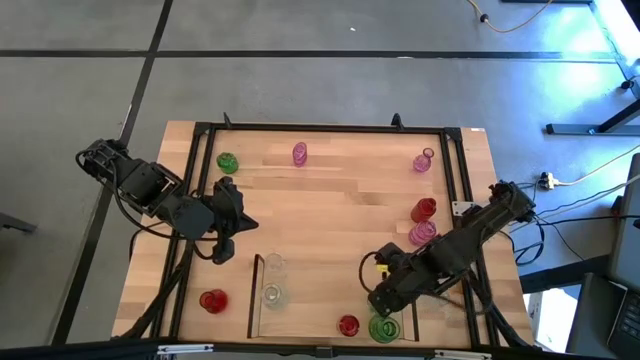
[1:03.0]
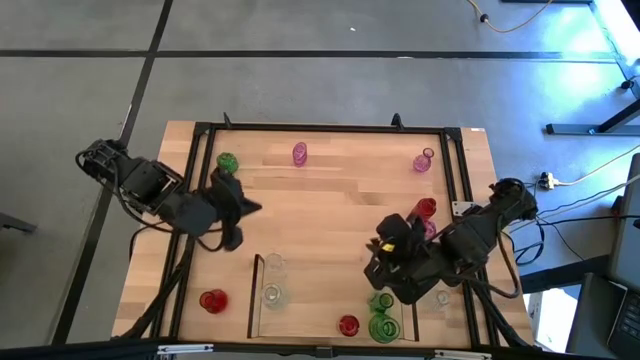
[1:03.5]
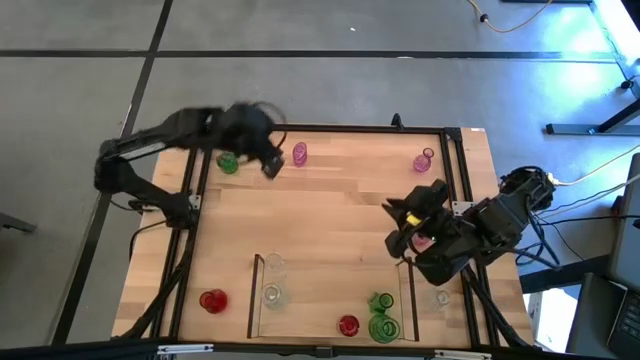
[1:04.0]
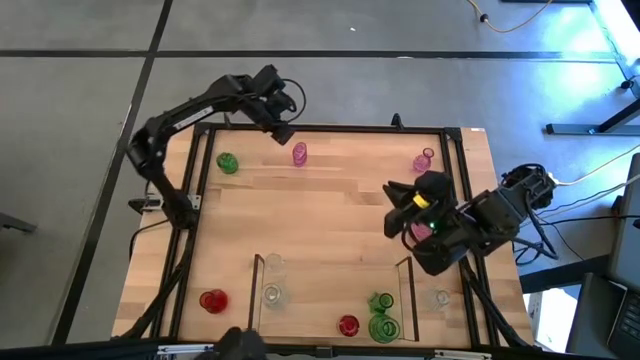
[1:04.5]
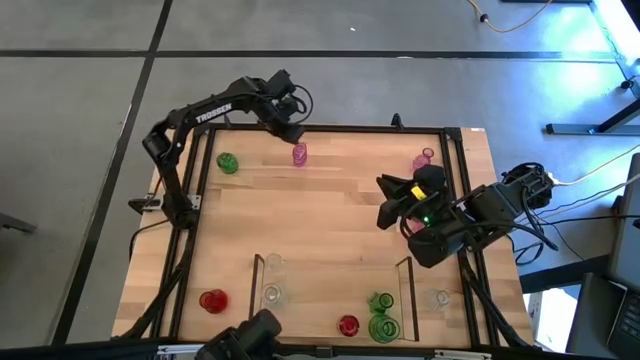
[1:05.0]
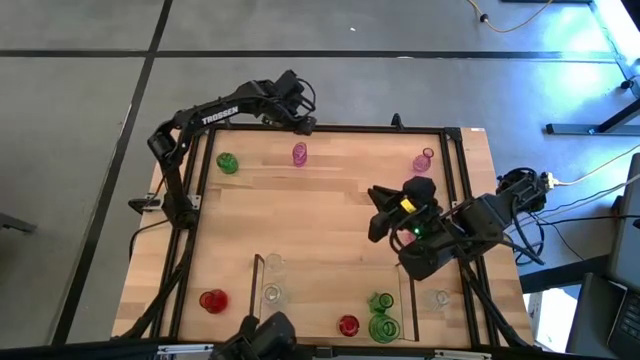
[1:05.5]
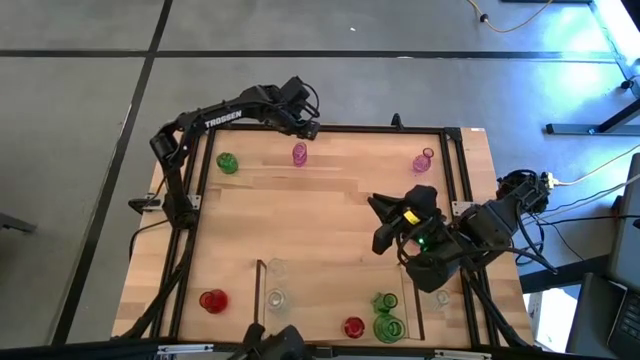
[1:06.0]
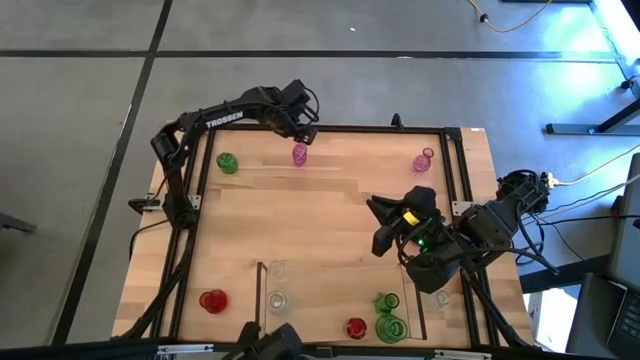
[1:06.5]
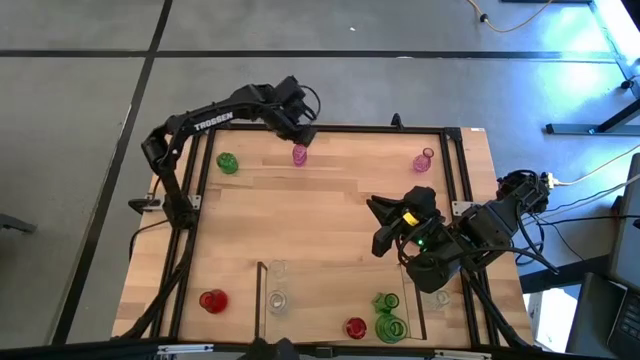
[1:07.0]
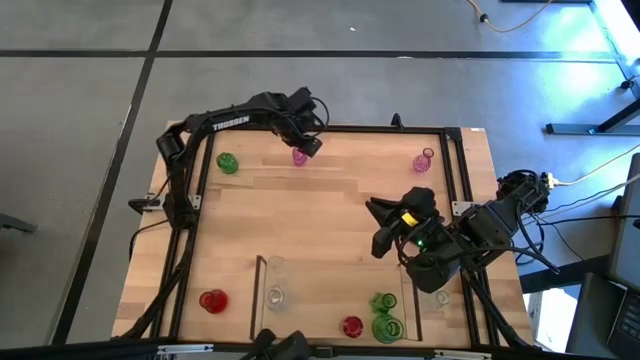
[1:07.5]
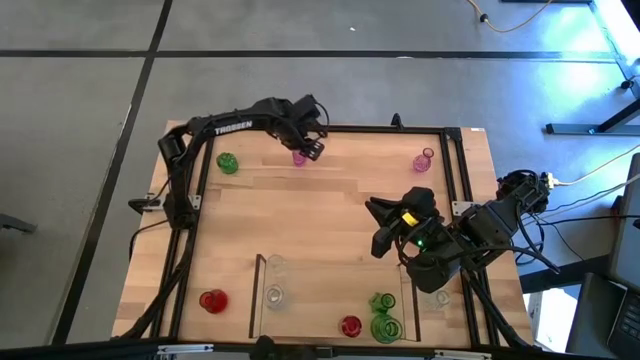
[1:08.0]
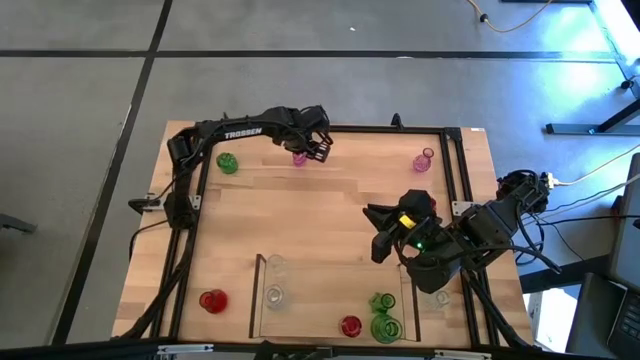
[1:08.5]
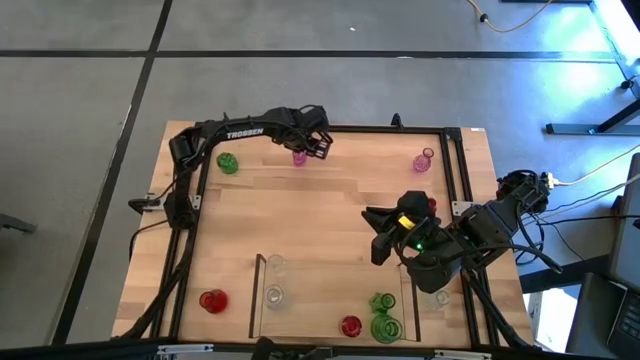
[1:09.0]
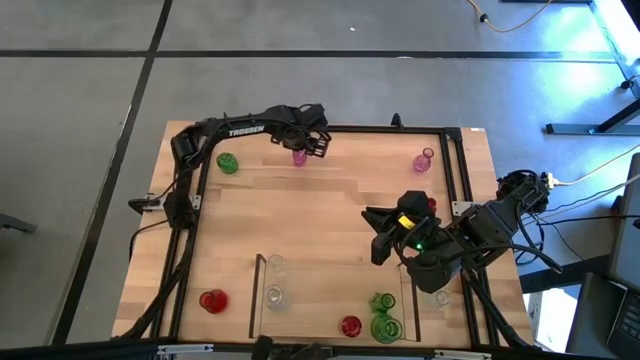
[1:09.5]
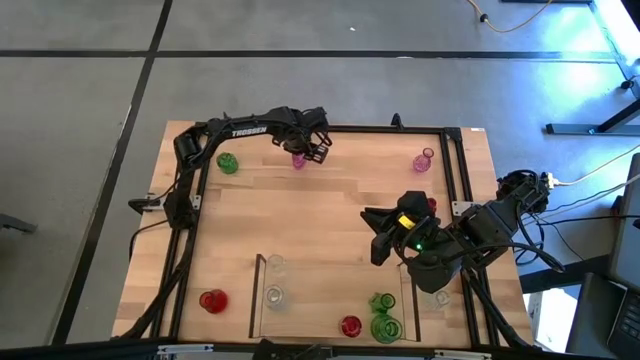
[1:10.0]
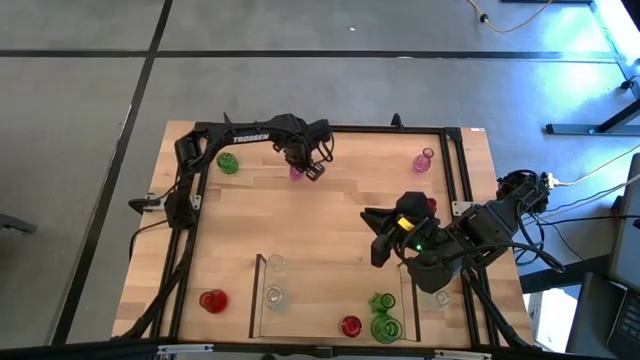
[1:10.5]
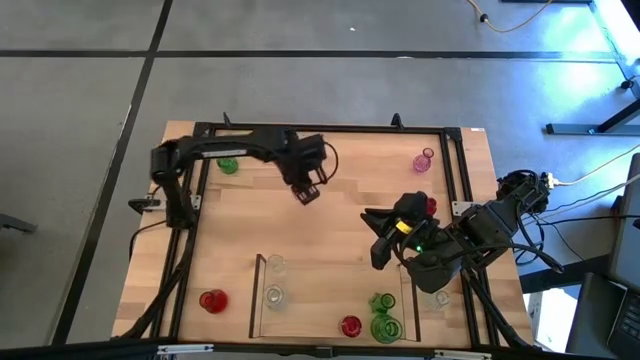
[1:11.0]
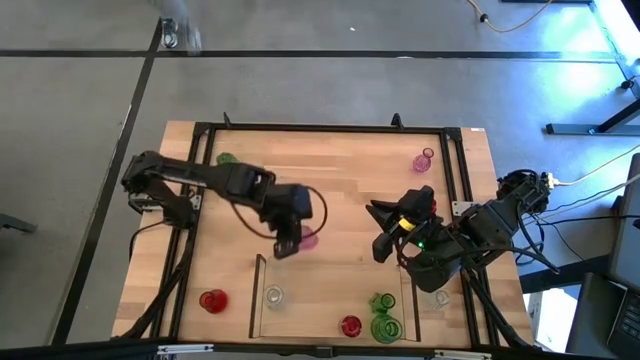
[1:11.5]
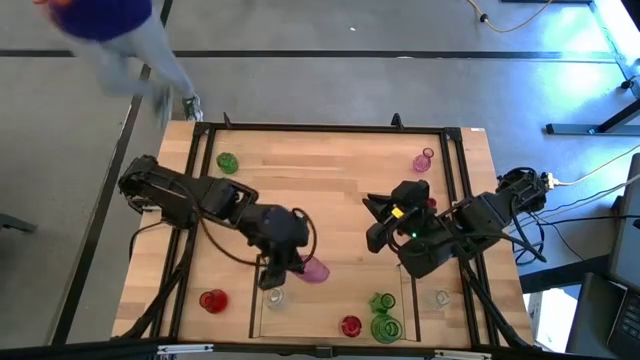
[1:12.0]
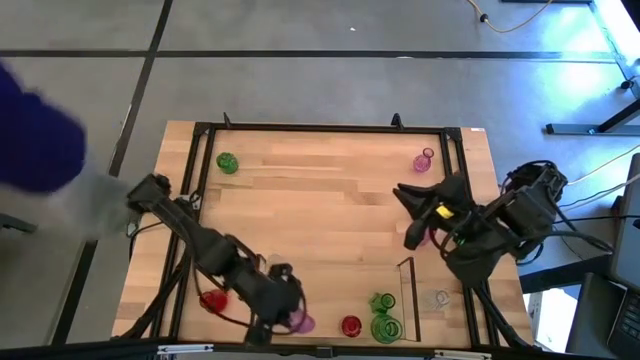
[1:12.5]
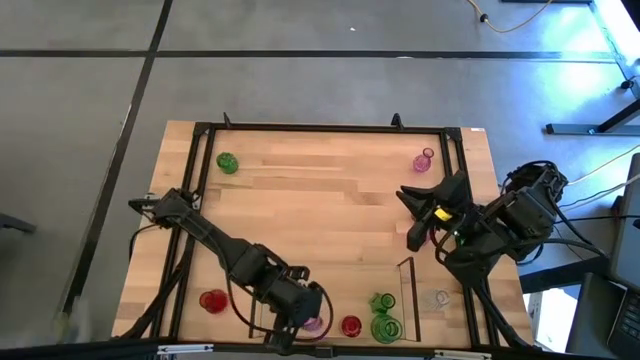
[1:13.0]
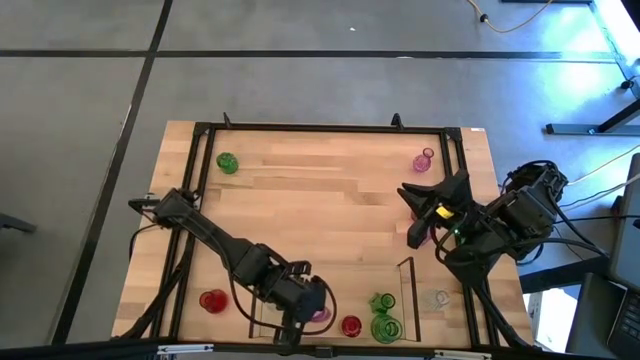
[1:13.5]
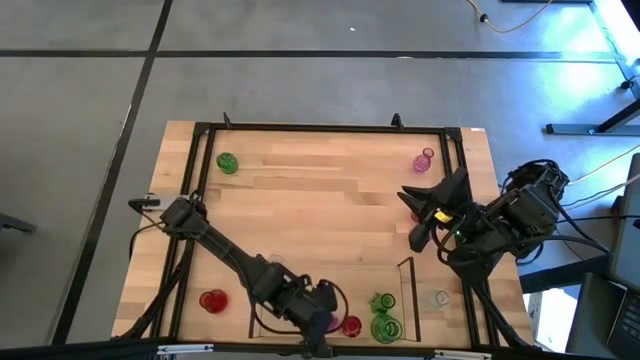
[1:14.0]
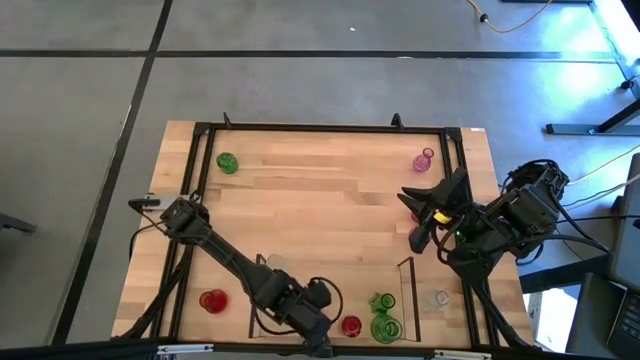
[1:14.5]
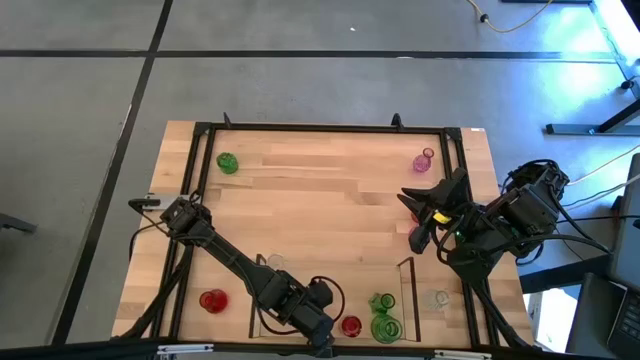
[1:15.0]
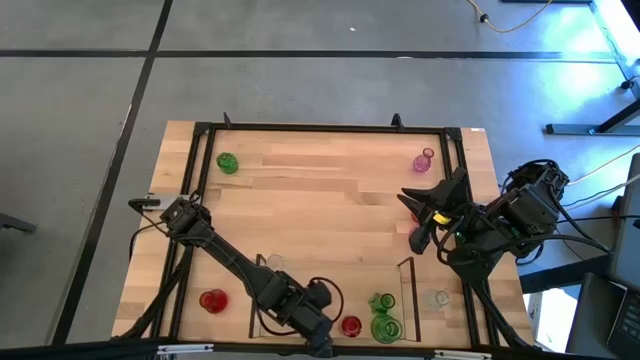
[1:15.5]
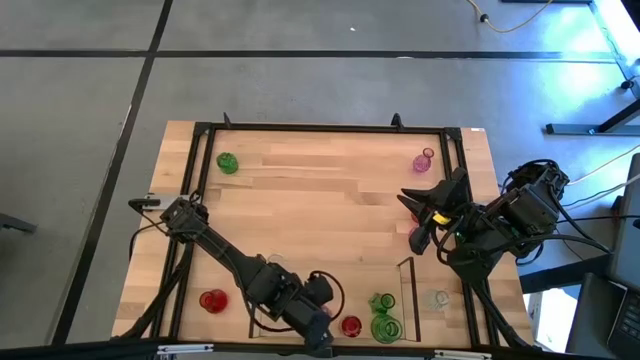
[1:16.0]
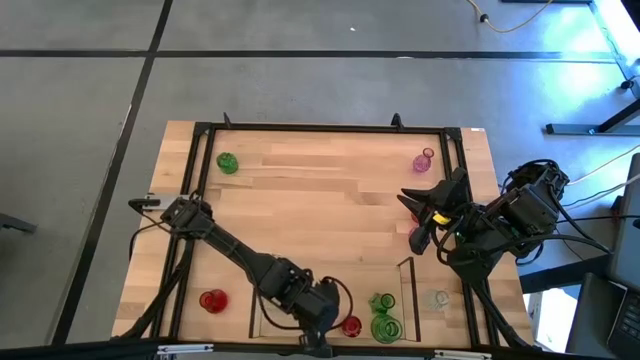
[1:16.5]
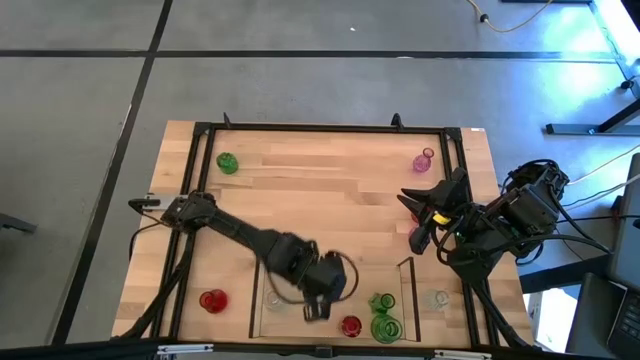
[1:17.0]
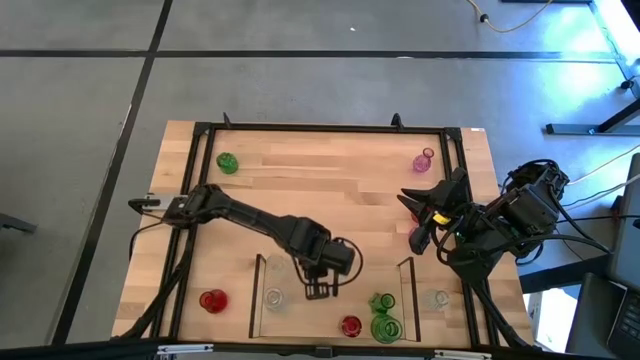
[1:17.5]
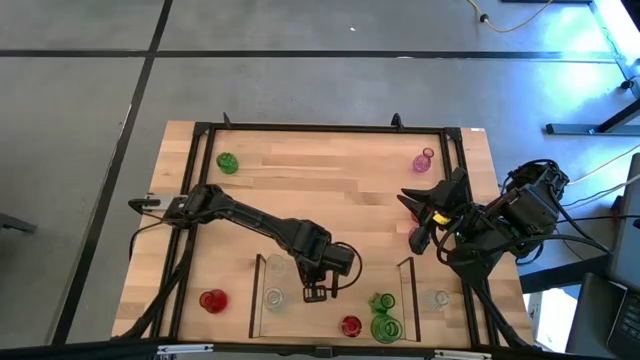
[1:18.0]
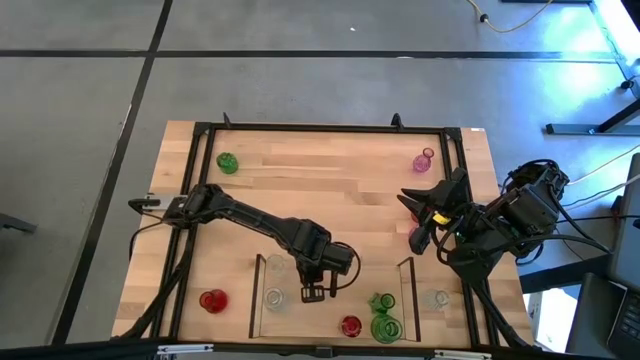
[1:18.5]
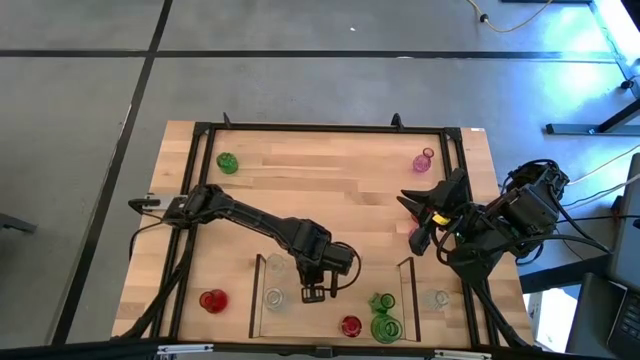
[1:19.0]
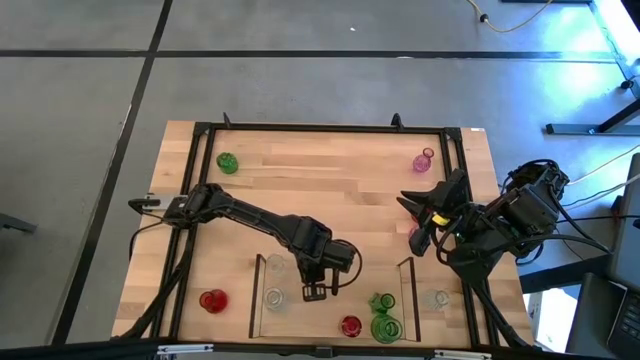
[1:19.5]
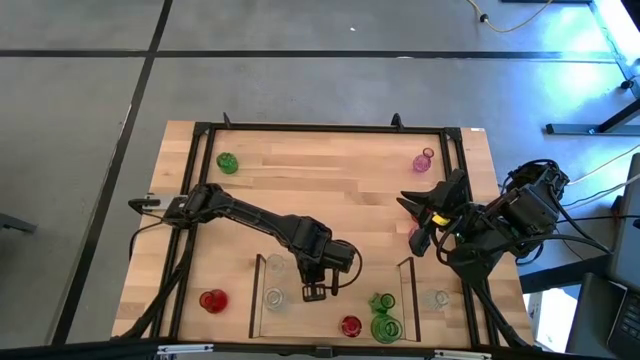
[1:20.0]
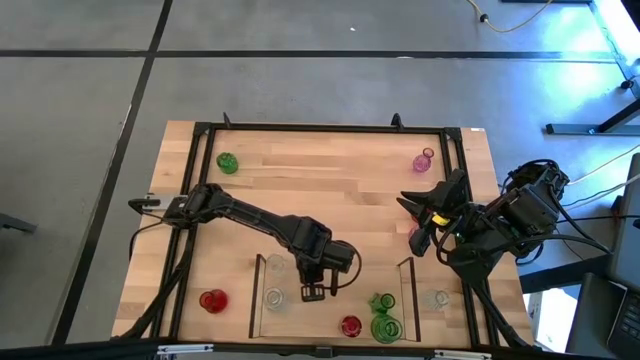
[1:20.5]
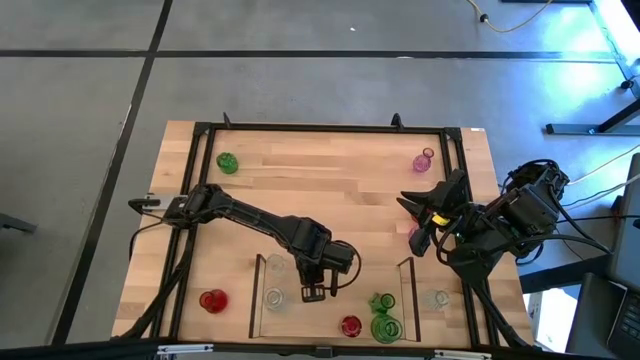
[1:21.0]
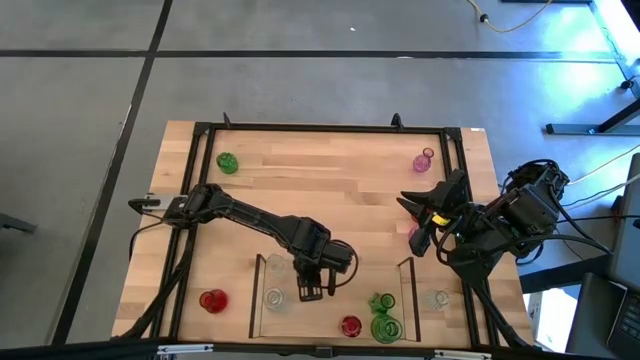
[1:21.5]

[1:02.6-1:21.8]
Task: sort vases onto shelf
Put the top left purple vase on the shelf

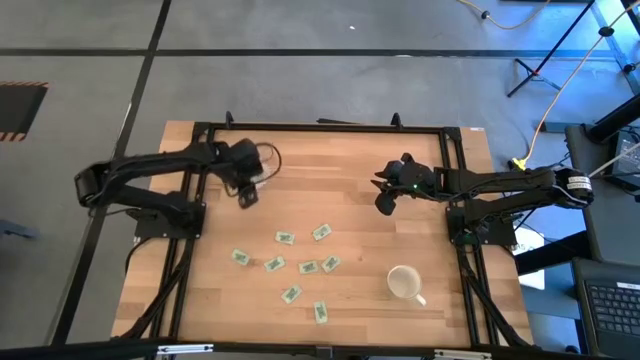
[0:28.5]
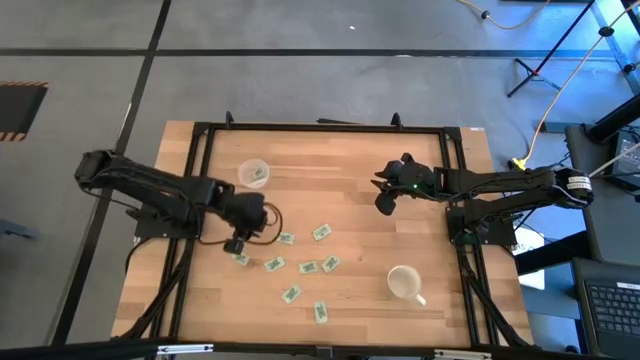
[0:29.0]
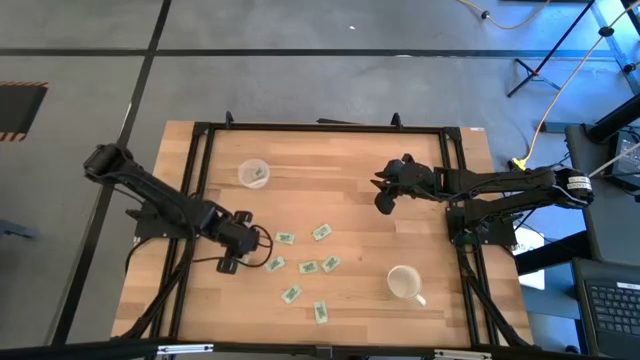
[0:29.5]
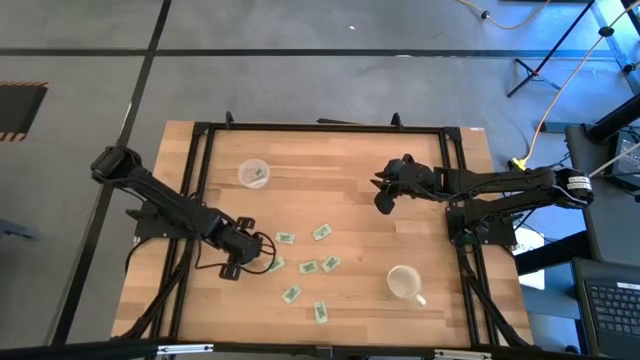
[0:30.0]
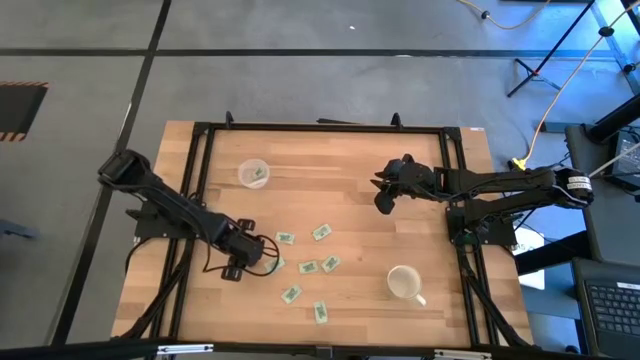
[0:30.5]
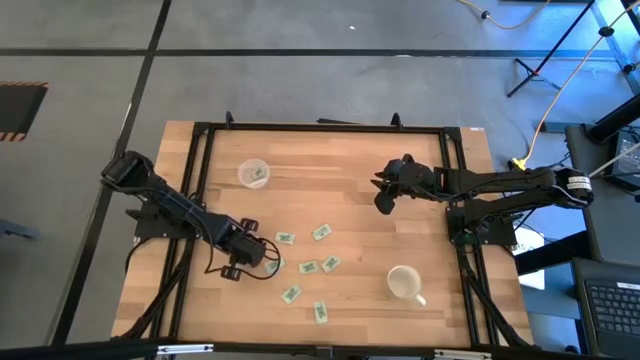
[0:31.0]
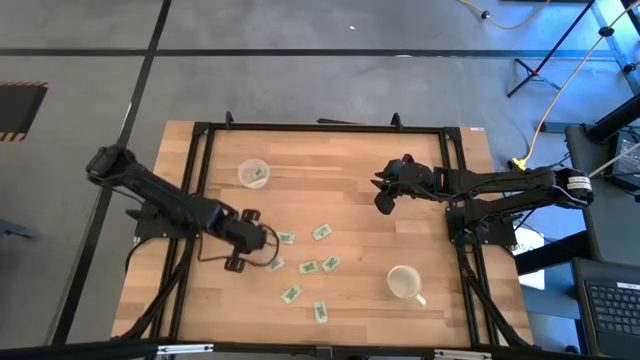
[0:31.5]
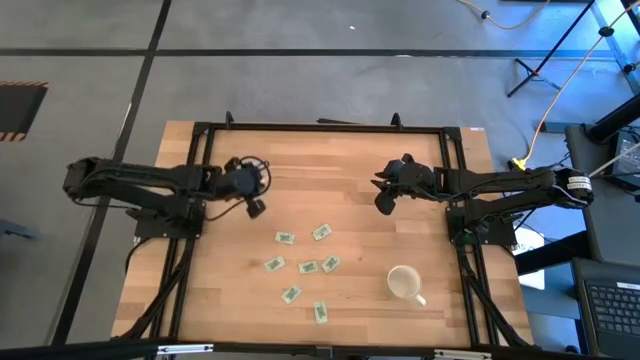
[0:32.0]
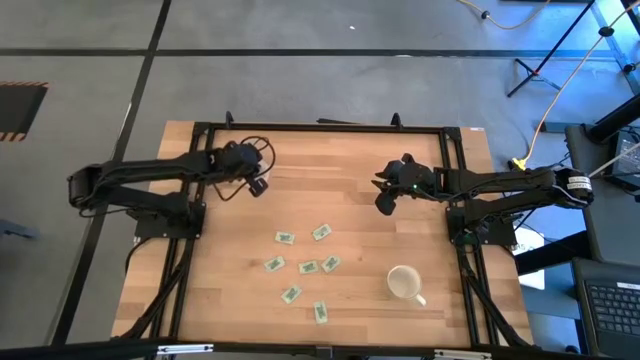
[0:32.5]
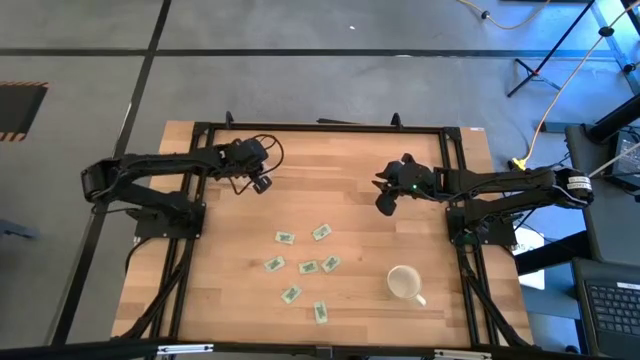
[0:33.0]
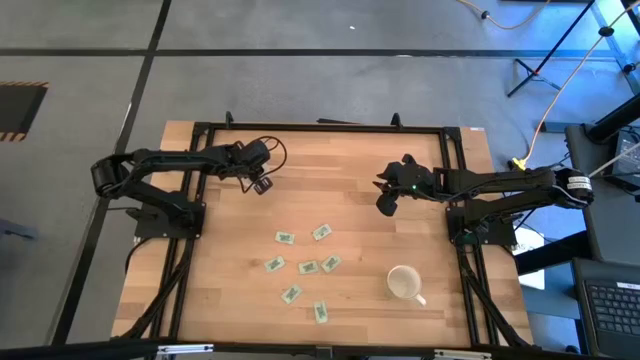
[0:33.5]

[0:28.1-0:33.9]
Task: Pick and place Stevia / Truvia into bins
Put the stevia packet into the left transparent container
